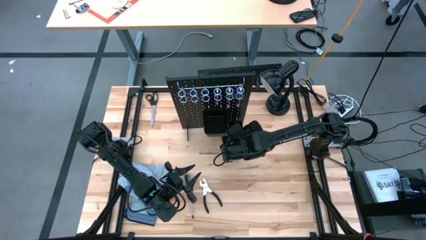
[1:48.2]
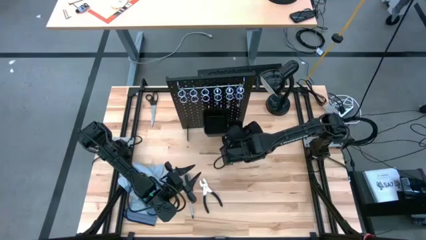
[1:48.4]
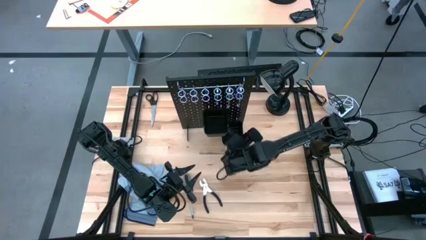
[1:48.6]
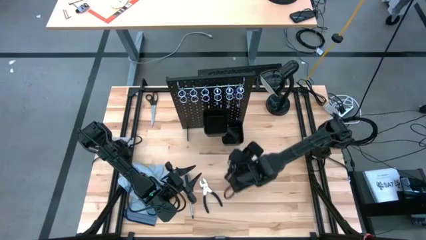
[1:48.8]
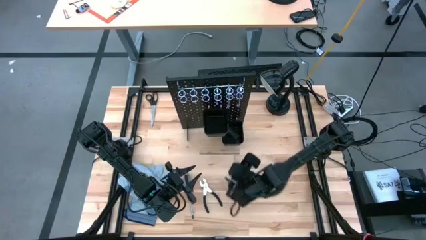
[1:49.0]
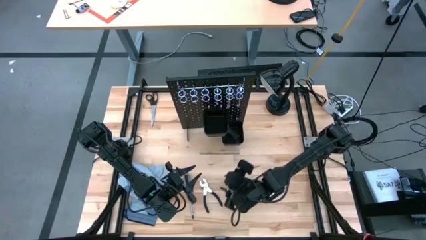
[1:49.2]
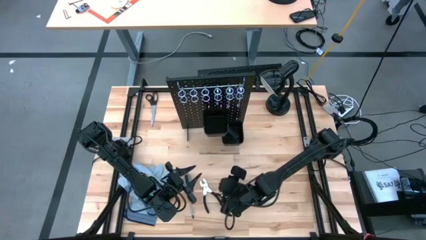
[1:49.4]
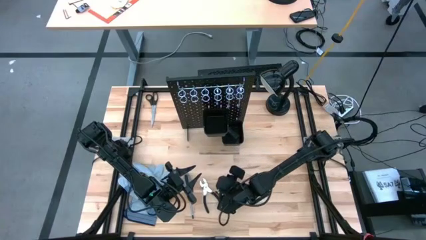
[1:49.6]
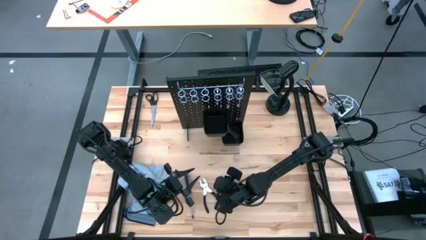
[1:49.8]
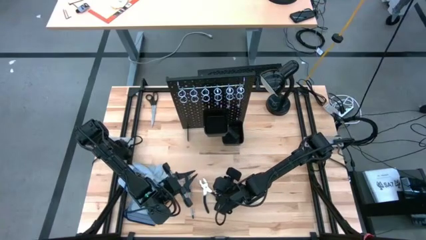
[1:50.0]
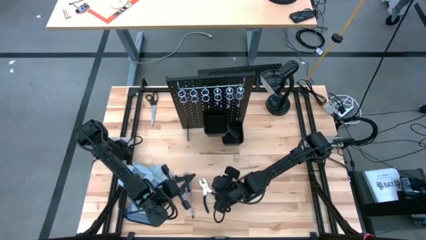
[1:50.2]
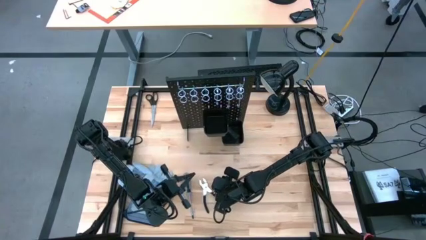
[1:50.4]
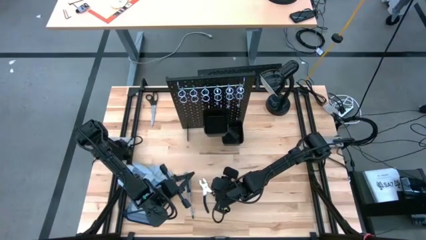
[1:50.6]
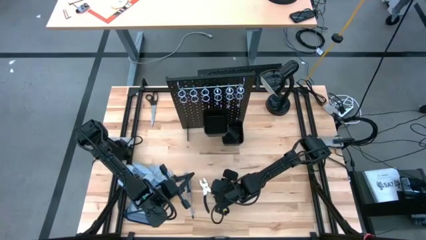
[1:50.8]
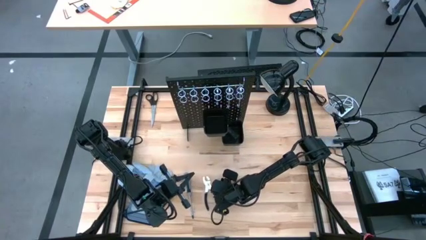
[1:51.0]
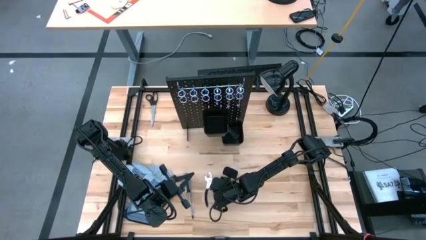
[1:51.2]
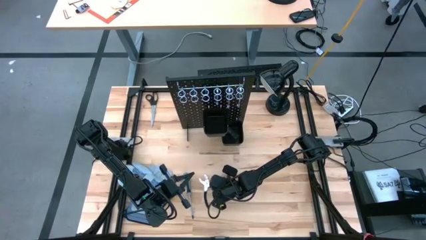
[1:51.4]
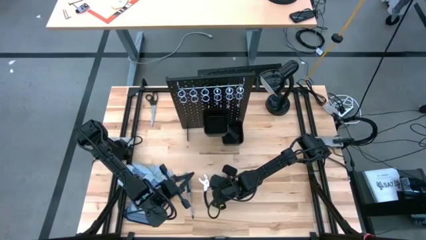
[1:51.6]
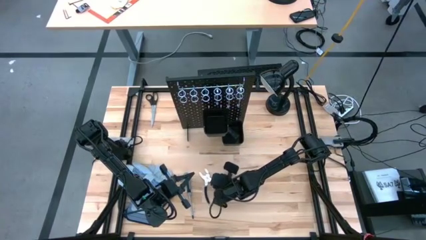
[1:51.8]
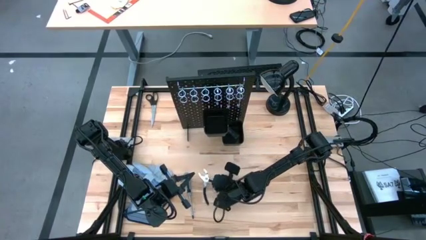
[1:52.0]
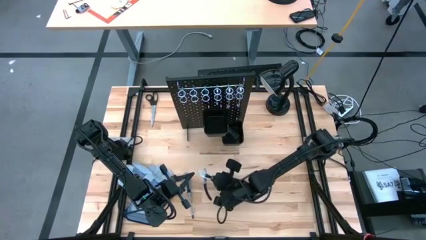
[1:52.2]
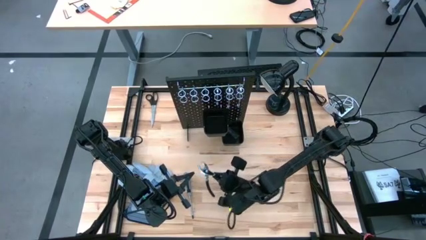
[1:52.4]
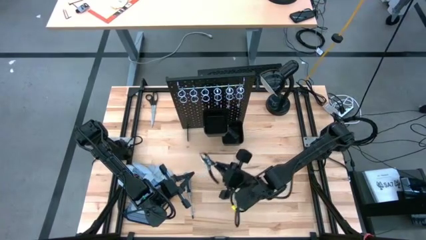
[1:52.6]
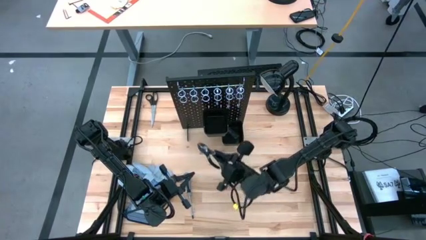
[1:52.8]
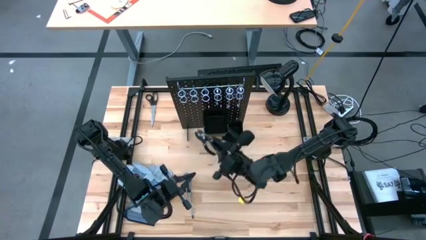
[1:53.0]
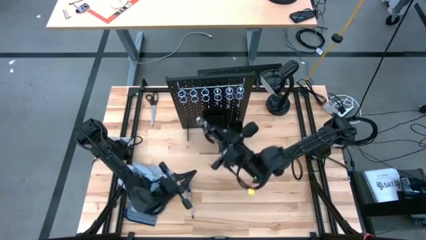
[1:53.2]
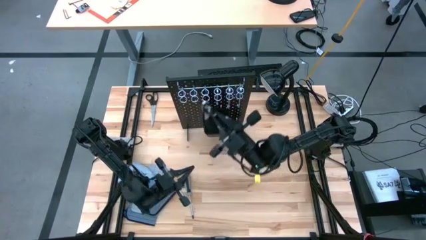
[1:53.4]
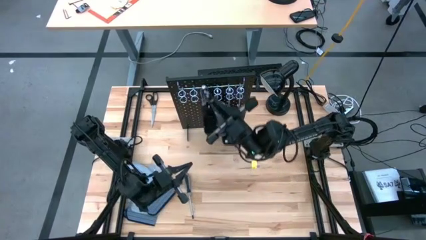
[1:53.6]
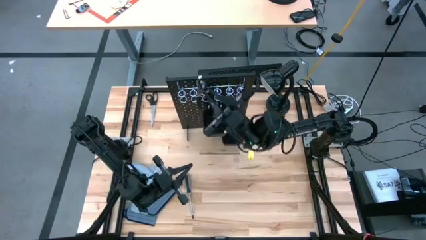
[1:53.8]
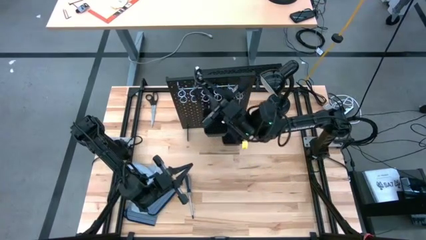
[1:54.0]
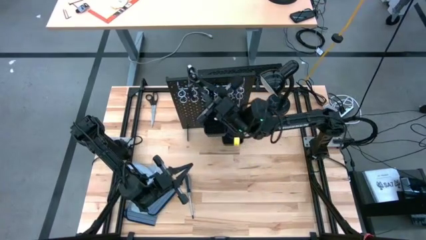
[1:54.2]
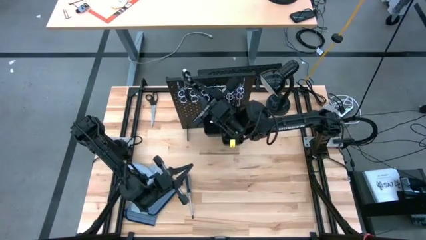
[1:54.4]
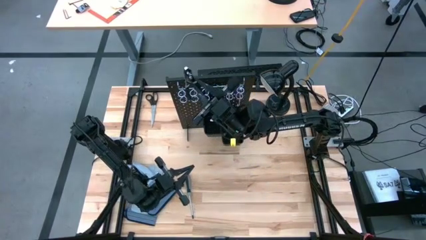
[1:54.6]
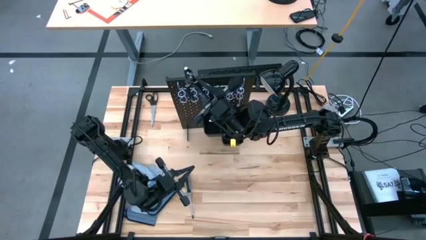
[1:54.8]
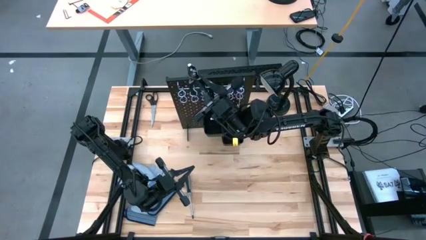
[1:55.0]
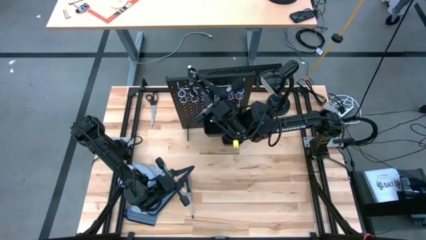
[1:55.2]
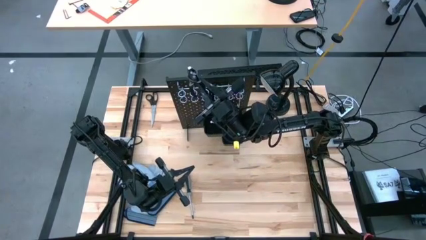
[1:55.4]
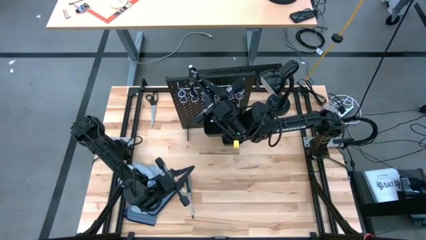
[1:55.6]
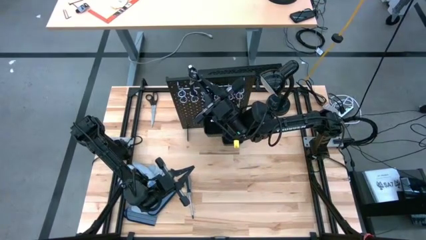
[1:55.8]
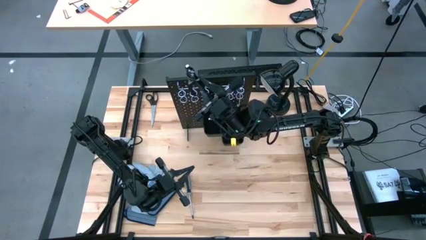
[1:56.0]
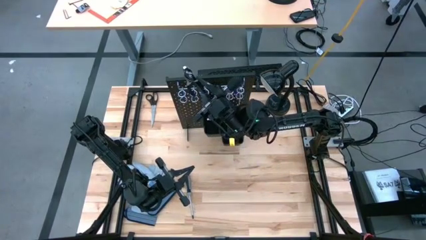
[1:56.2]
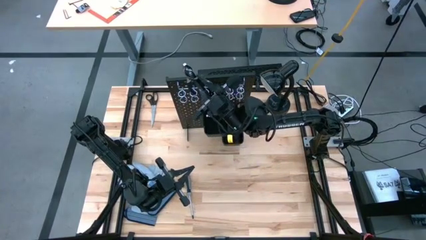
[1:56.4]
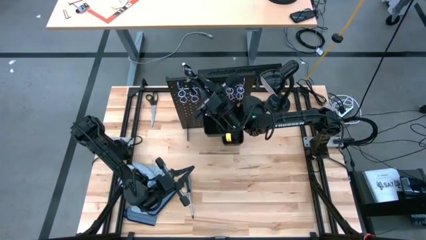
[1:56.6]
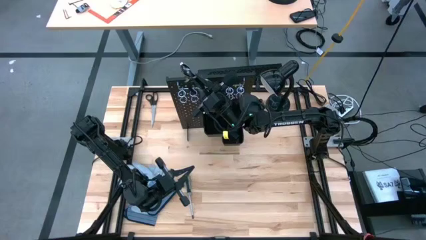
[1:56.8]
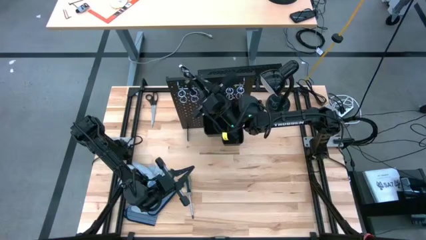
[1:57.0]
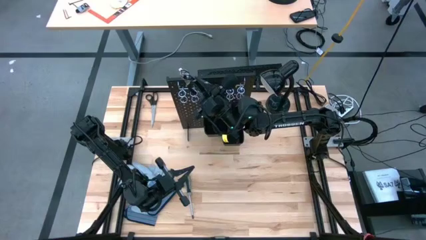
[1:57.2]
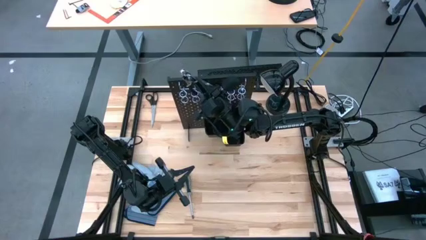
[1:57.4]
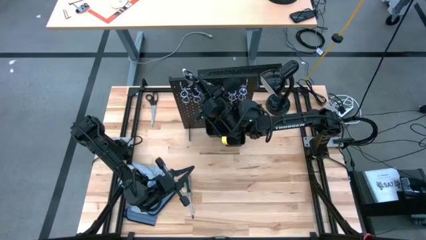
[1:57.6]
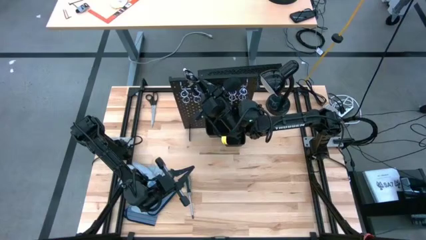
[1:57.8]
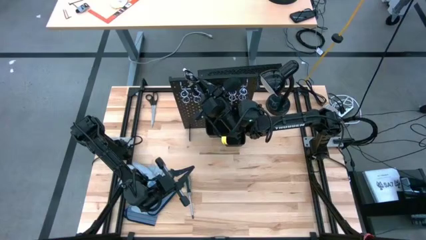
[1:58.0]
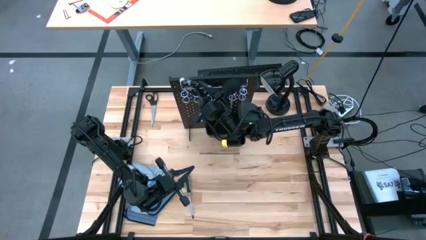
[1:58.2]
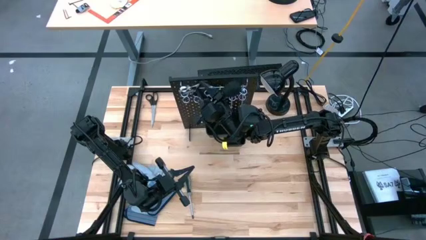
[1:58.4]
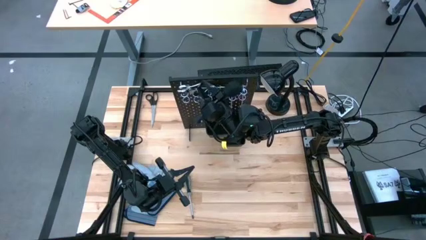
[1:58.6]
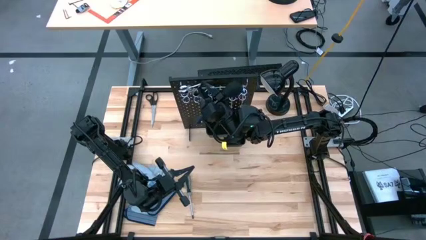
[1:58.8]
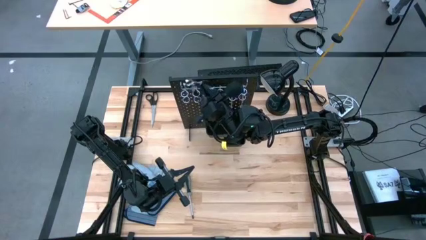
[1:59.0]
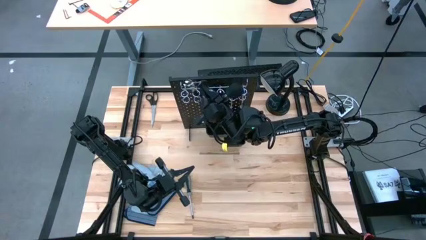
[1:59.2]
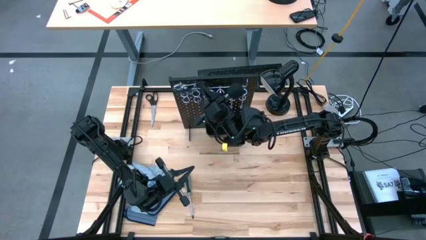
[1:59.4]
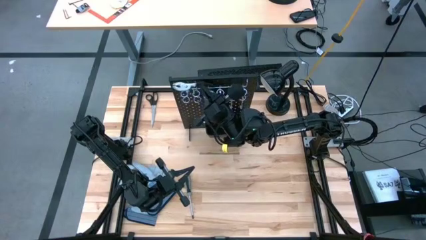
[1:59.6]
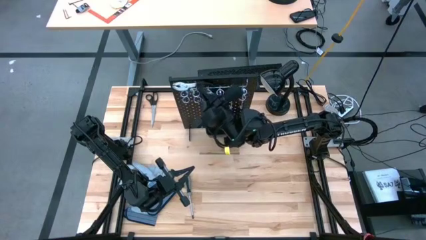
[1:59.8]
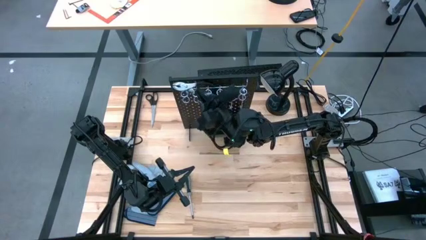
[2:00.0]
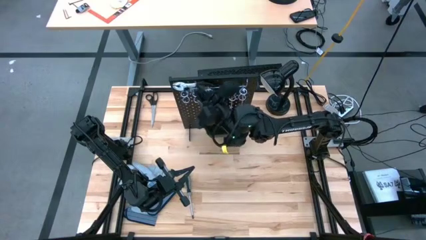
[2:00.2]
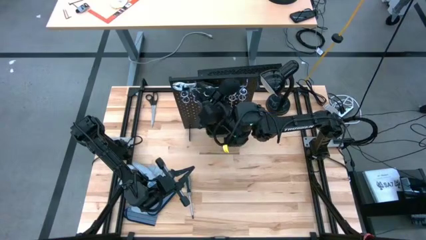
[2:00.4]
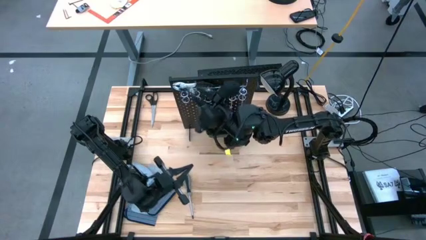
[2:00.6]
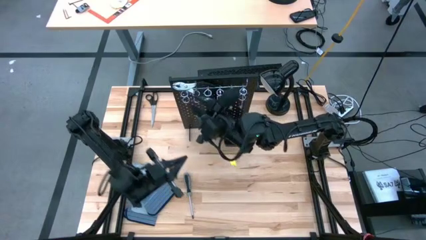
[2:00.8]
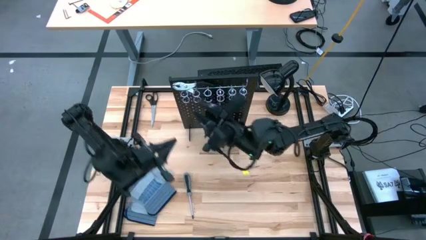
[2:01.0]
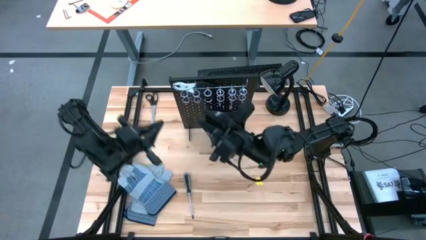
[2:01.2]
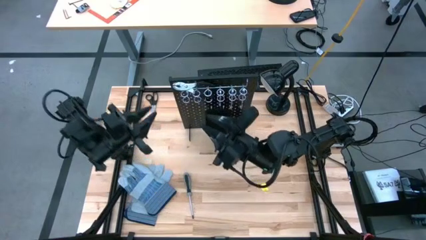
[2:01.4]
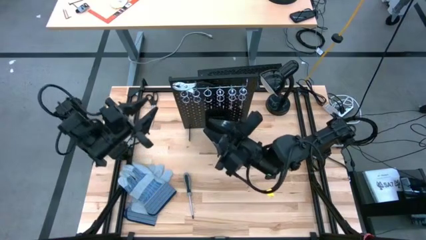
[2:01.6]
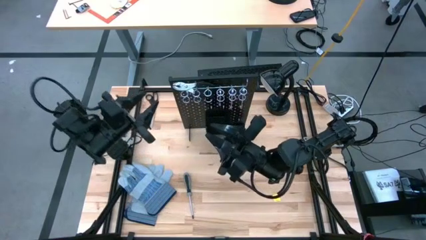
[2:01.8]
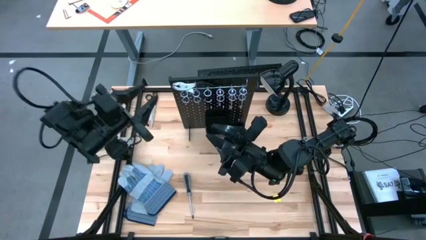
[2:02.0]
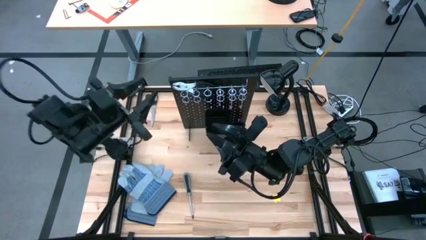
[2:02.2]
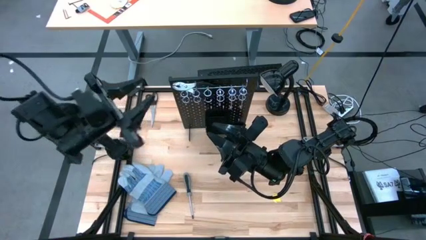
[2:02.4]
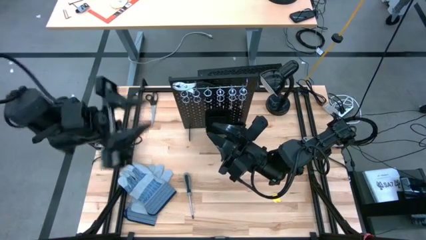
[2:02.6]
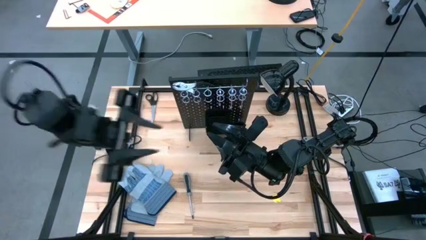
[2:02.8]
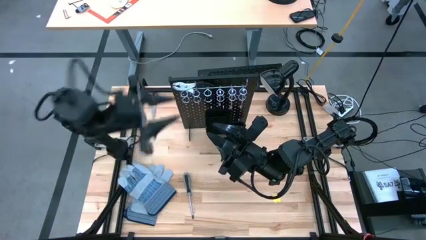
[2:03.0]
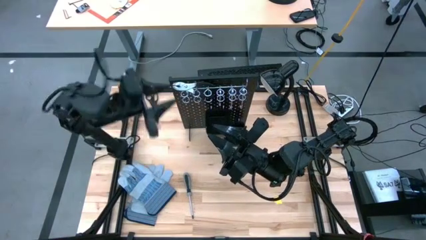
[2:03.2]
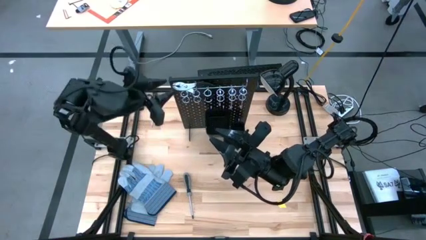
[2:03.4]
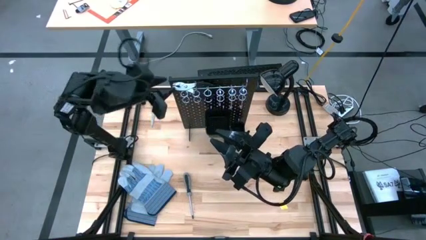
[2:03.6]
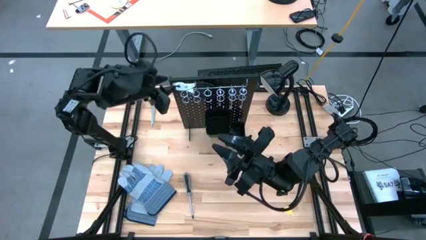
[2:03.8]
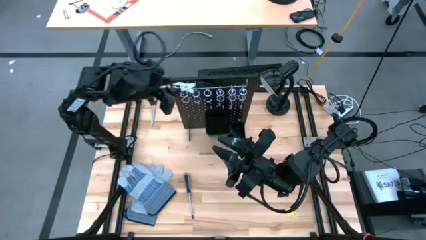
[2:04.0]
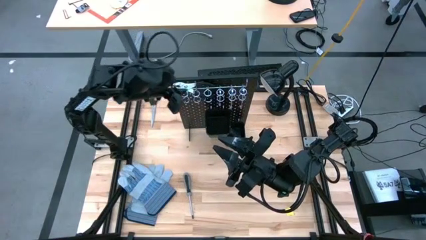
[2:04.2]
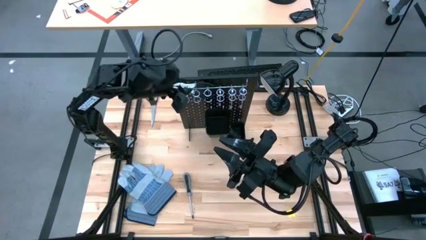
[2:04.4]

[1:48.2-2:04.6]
Task: Hang tools onto peg board
Hang the black pliers on the black pegboard
